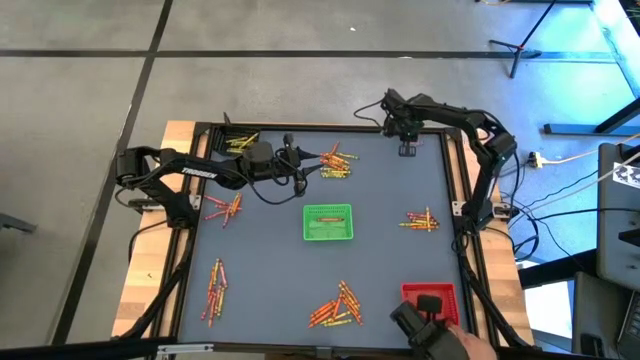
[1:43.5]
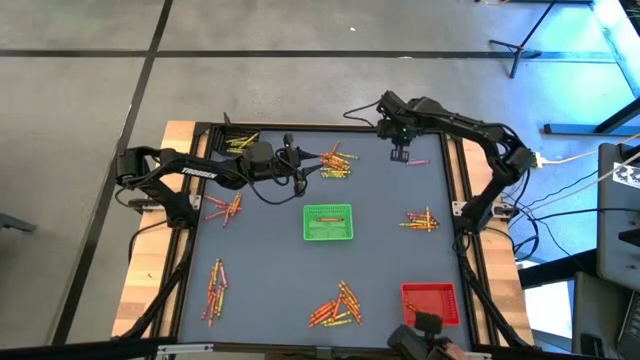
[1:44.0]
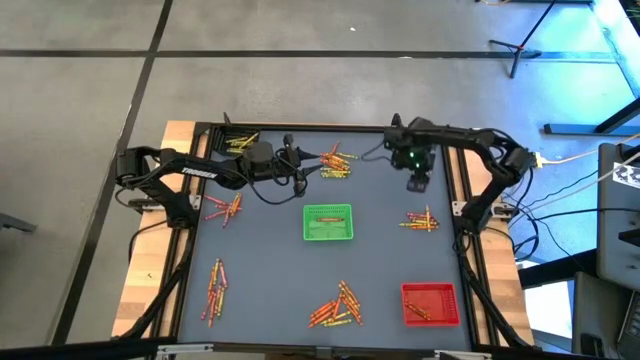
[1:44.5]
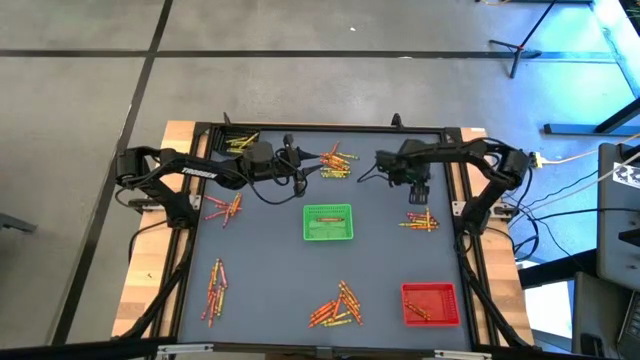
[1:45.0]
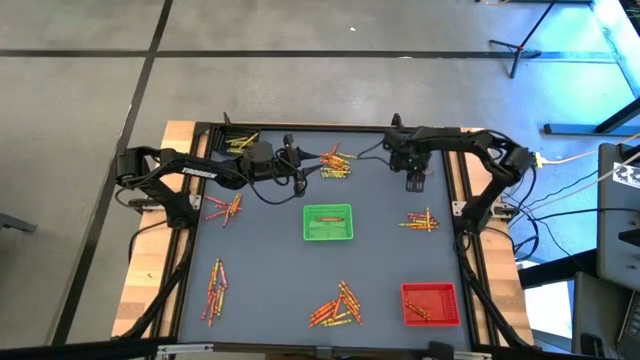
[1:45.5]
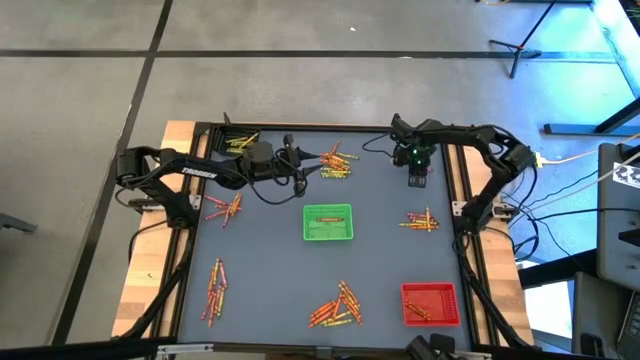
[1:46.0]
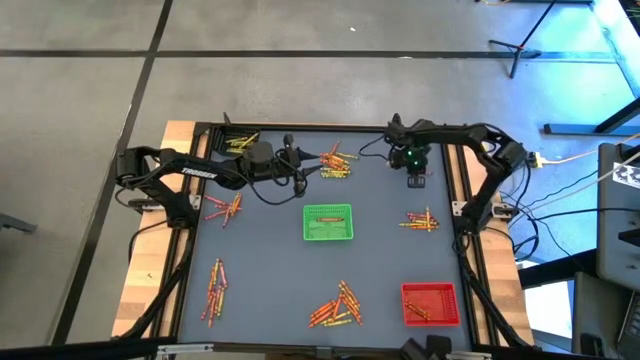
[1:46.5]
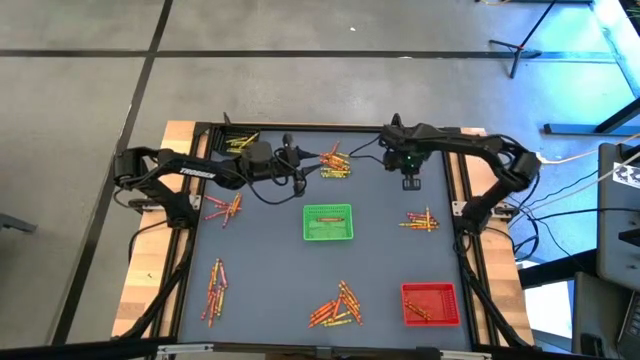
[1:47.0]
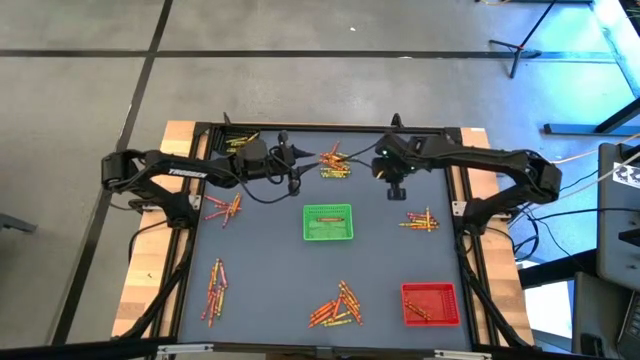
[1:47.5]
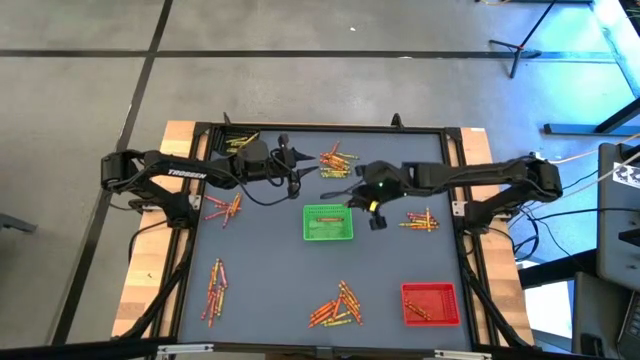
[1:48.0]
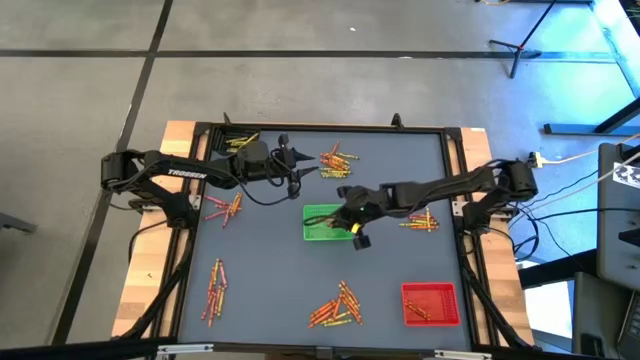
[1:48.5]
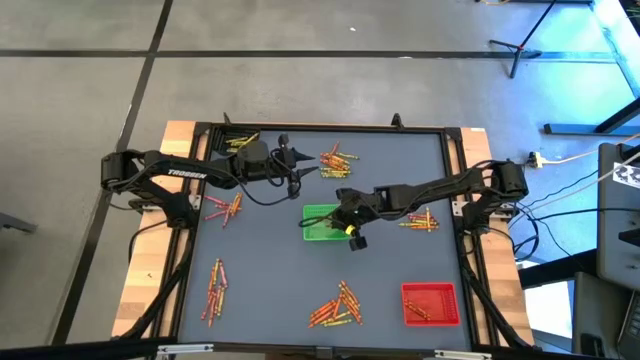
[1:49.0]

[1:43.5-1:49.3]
Task: Sort crayons
Put the red crayon into the green bin

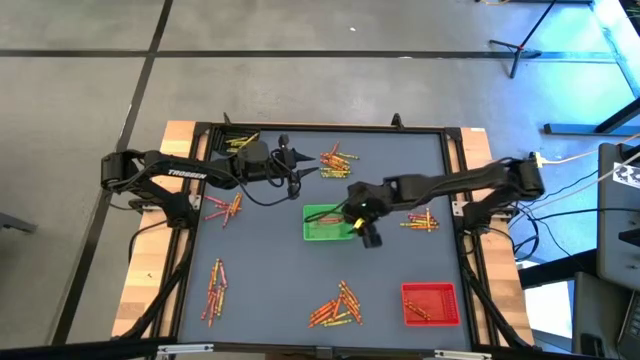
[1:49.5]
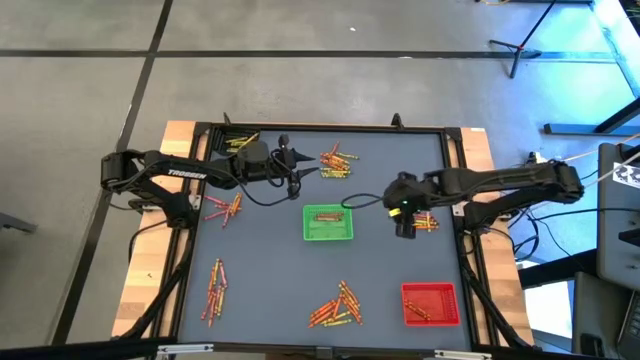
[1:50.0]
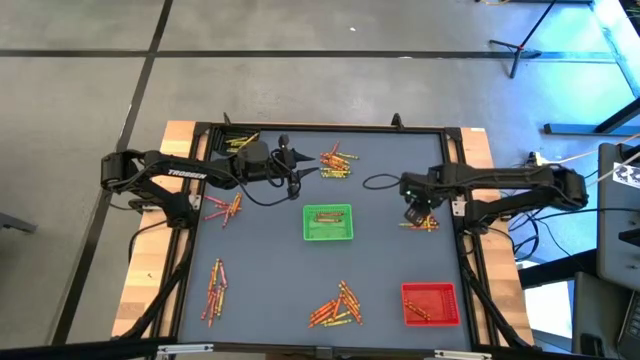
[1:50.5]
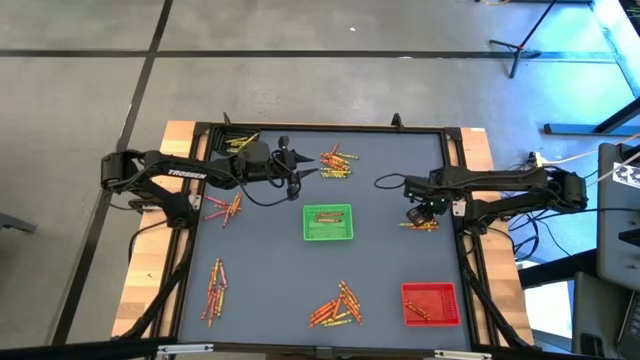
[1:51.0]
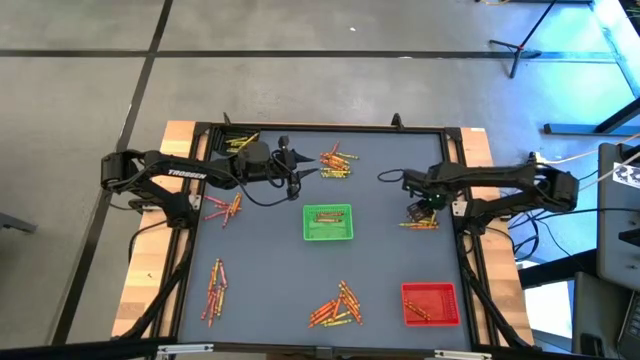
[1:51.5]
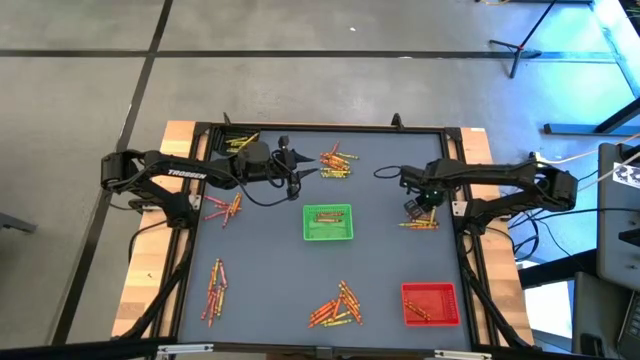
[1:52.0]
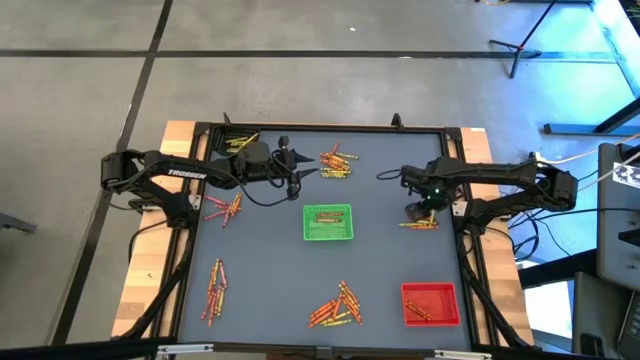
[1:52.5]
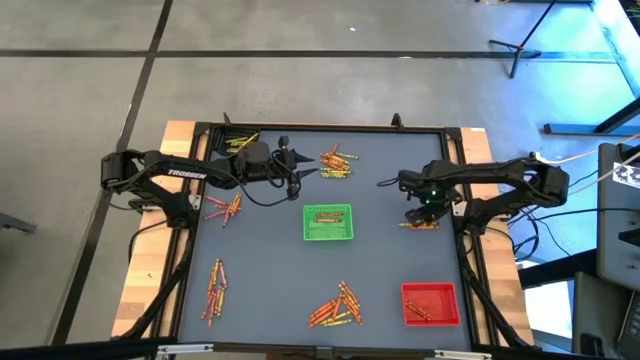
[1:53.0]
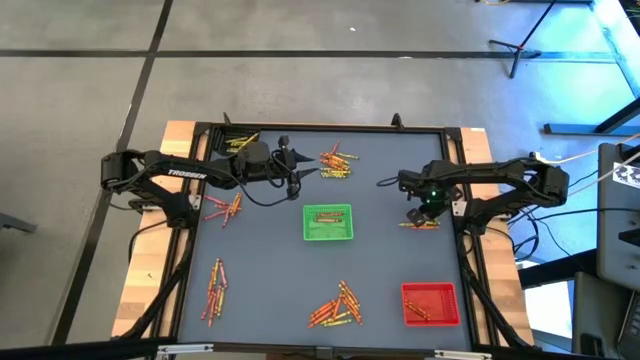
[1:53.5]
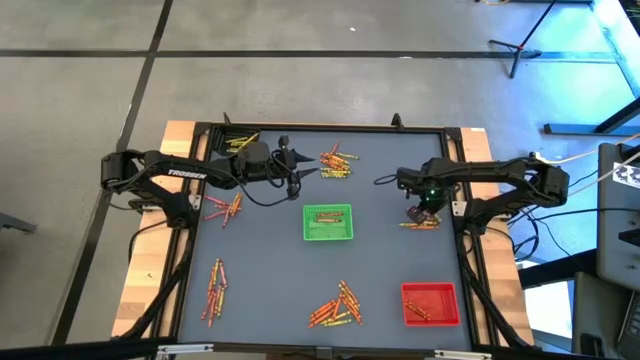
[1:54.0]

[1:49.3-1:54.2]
Put the light green crayon into the black bin

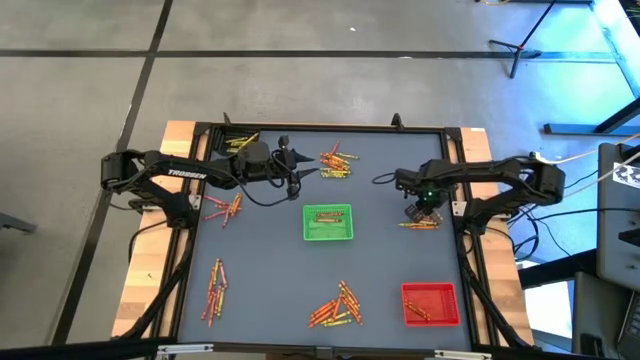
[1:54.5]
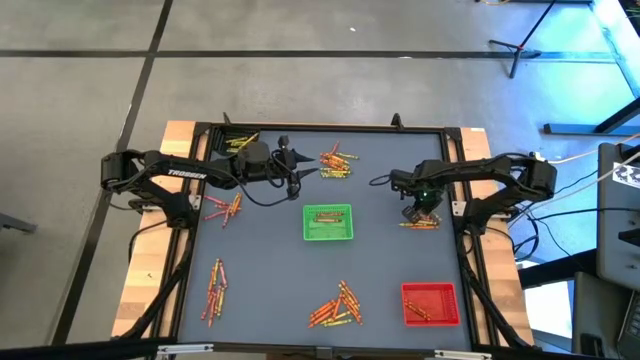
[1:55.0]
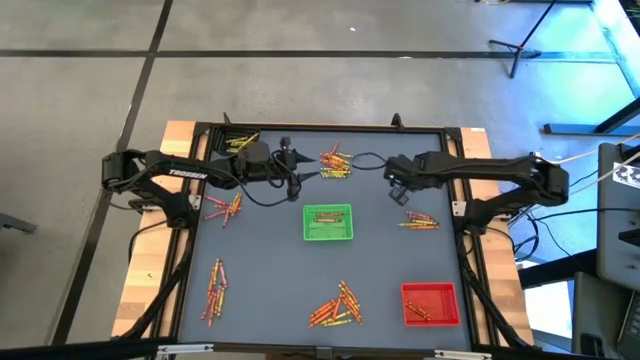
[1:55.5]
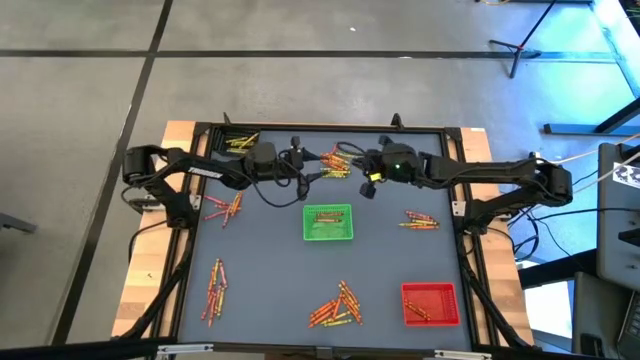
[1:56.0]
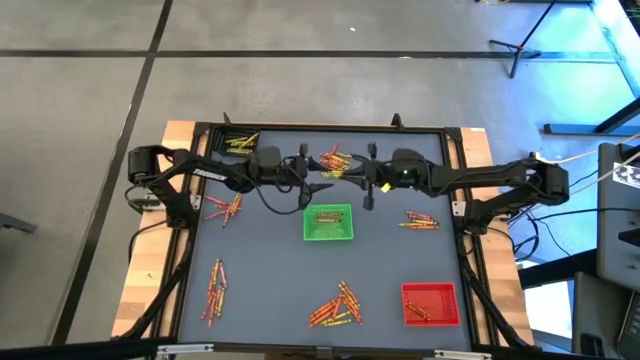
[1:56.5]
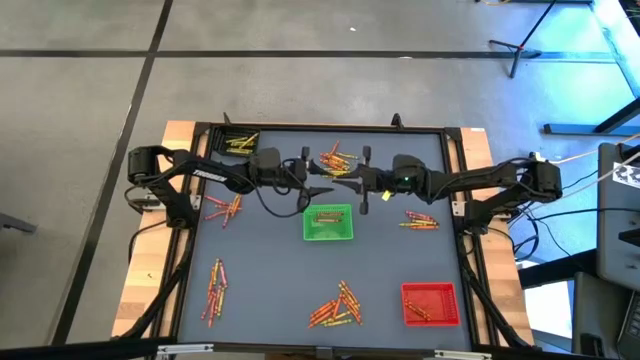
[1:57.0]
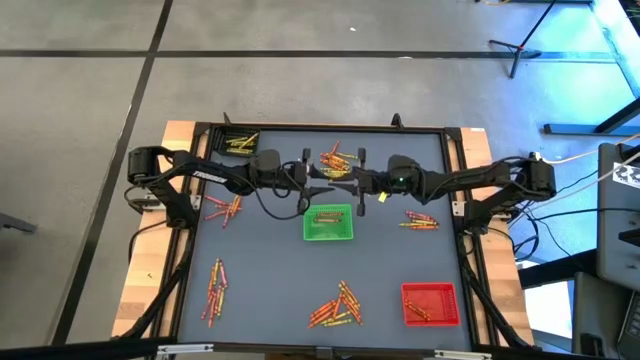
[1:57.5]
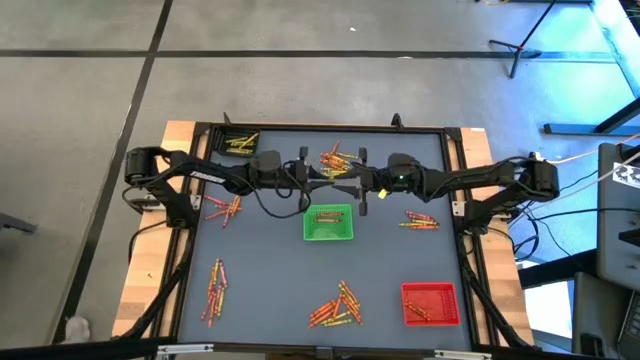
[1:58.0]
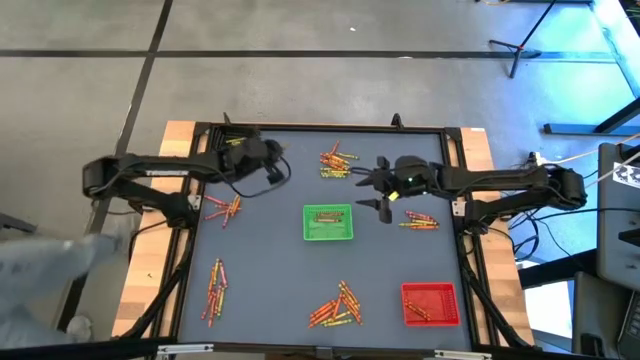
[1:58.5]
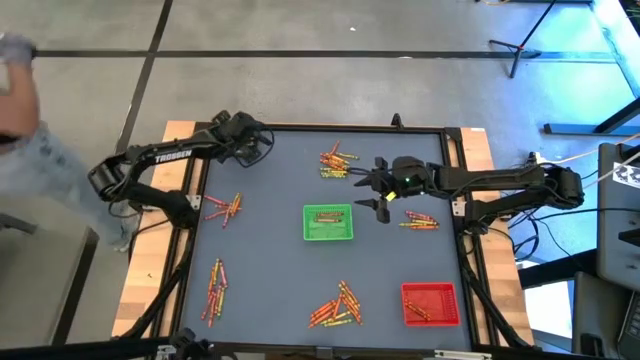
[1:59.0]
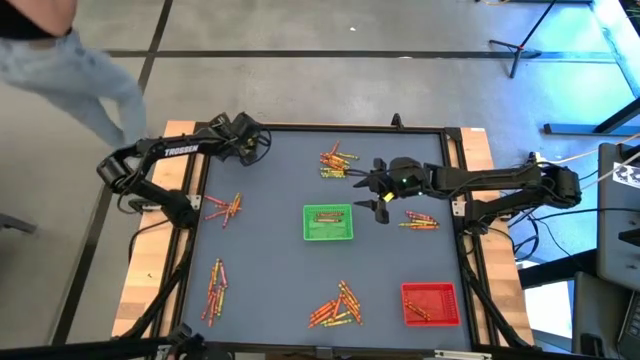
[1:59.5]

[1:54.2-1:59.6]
Put the light green crayon into the black bin

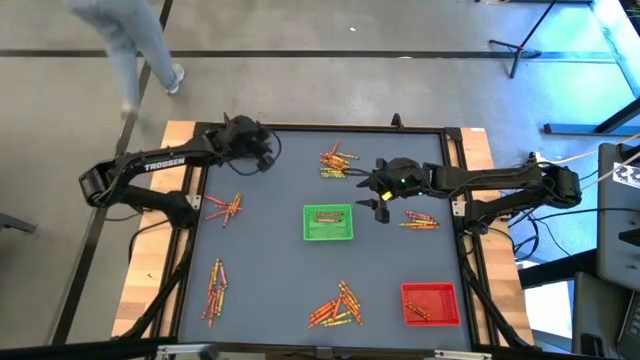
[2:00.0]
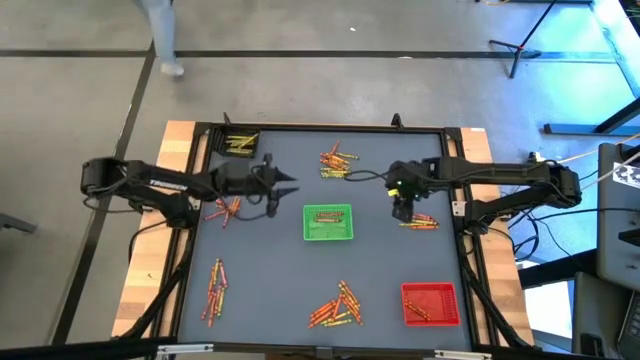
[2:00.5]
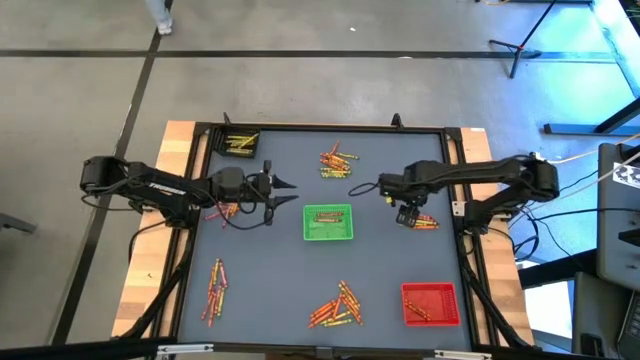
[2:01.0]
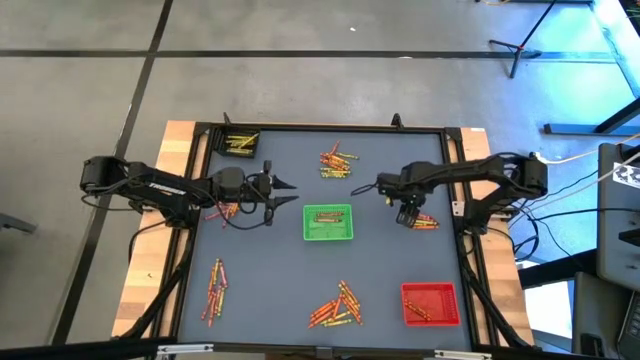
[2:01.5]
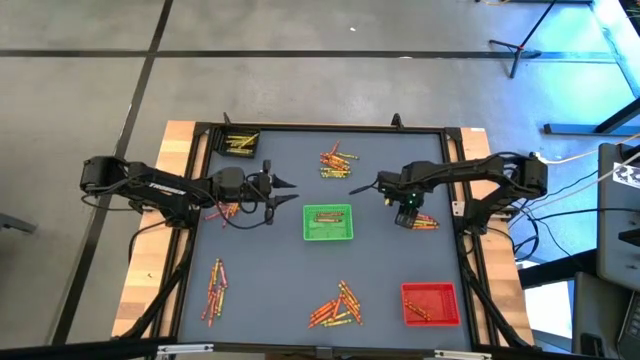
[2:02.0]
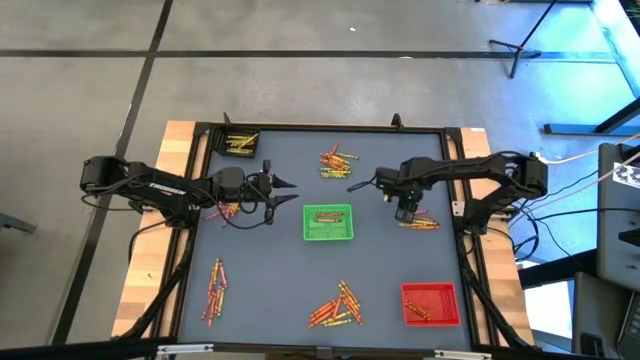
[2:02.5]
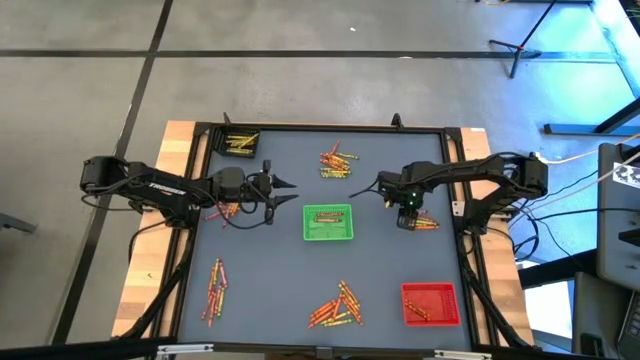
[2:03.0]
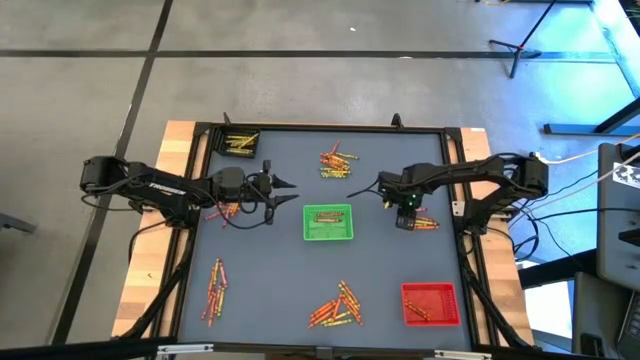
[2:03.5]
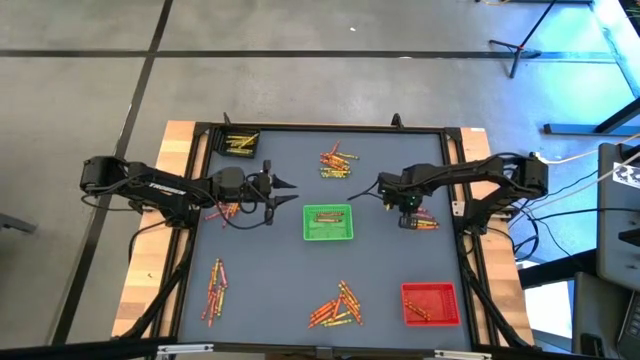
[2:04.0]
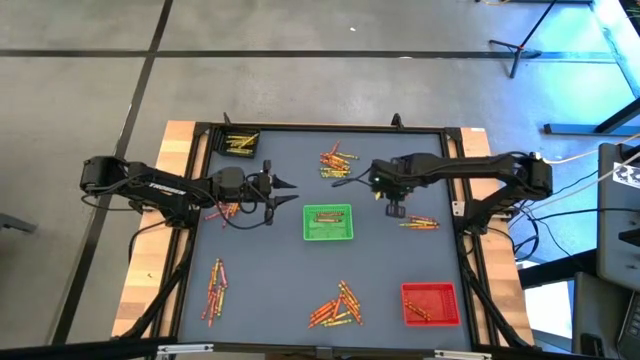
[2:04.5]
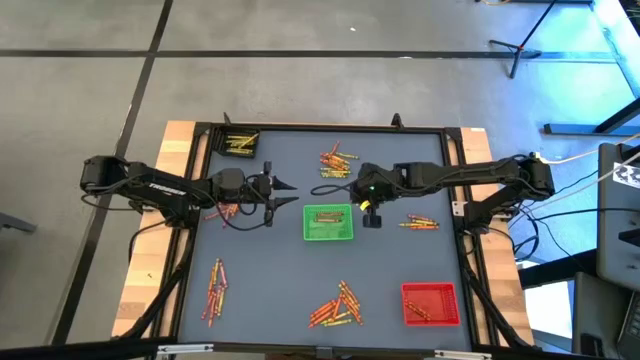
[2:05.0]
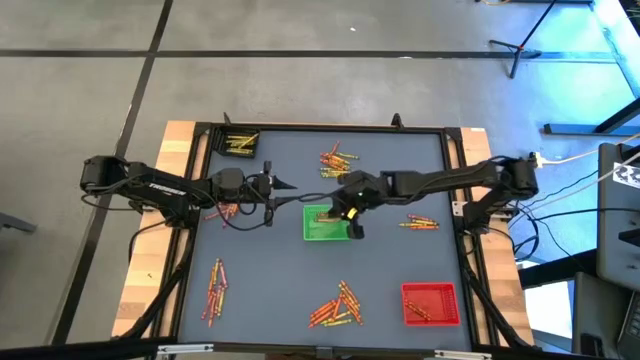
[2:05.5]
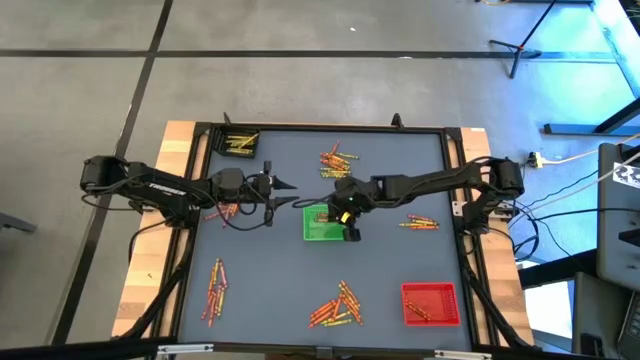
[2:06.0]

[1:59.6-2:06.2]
Put the red crayon into the green bin
